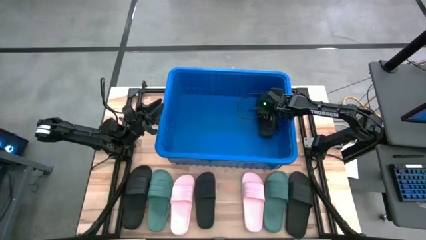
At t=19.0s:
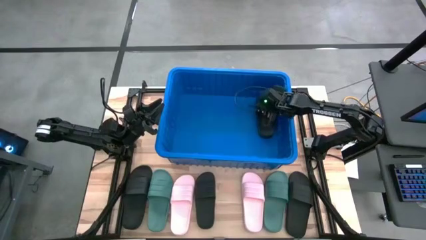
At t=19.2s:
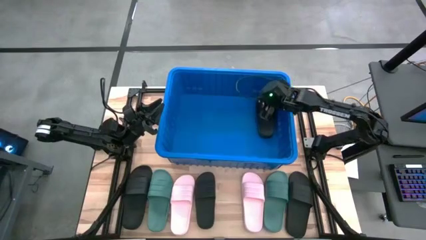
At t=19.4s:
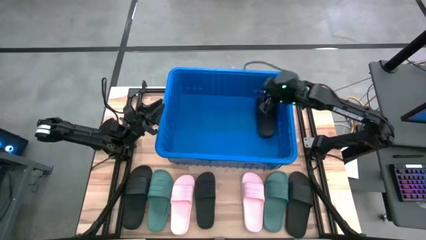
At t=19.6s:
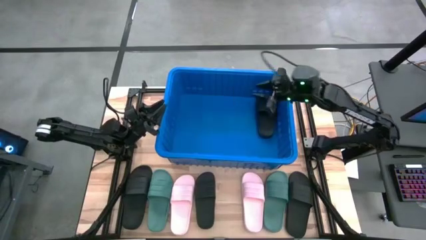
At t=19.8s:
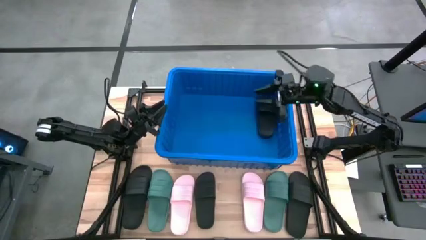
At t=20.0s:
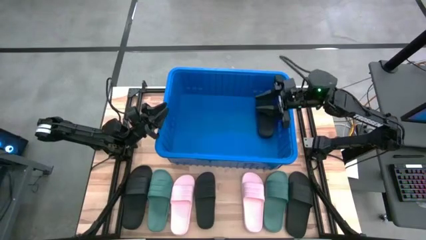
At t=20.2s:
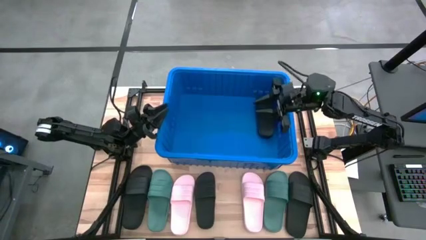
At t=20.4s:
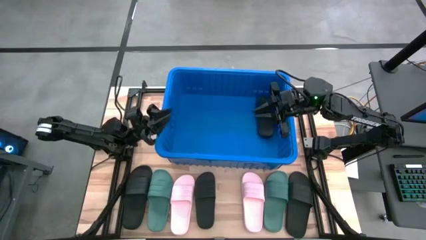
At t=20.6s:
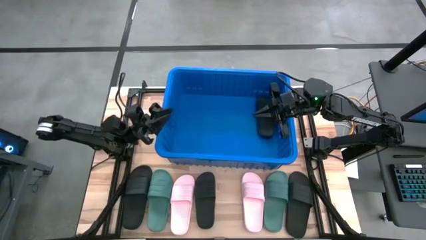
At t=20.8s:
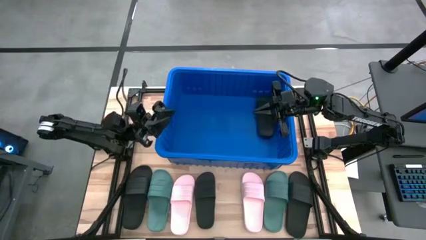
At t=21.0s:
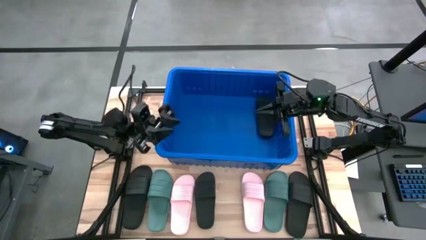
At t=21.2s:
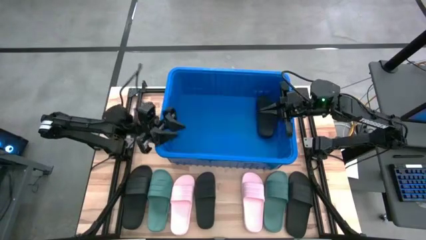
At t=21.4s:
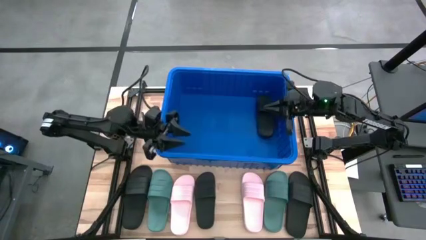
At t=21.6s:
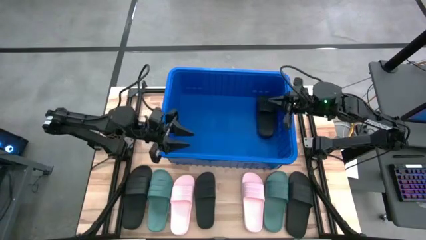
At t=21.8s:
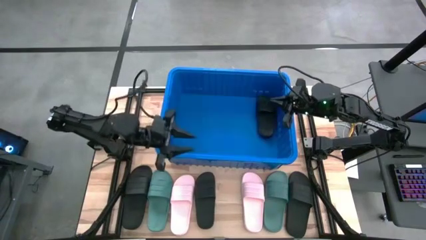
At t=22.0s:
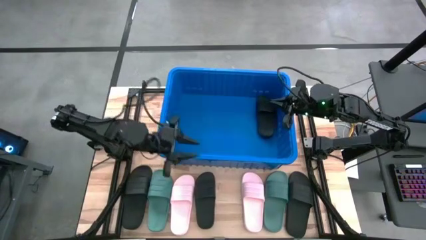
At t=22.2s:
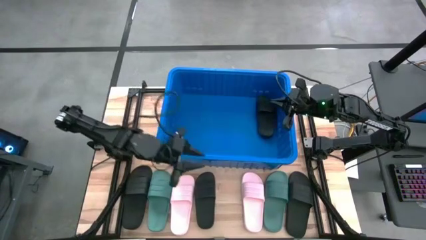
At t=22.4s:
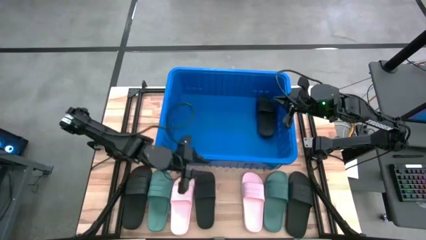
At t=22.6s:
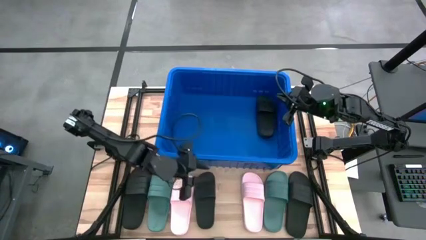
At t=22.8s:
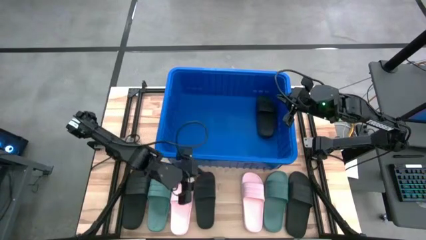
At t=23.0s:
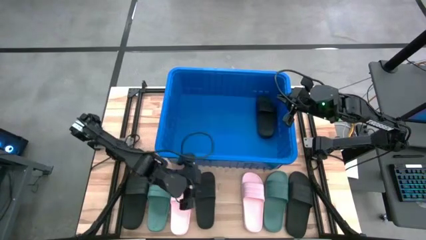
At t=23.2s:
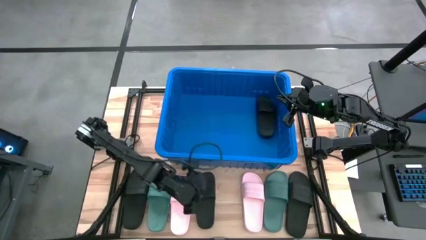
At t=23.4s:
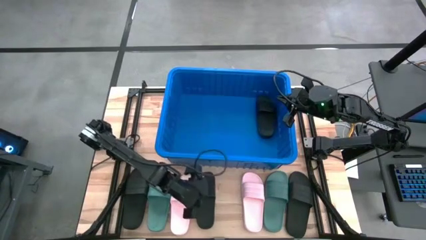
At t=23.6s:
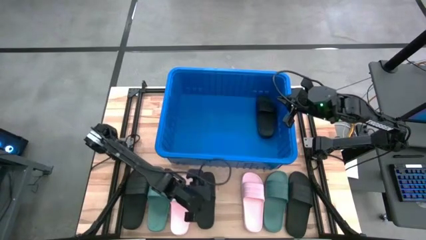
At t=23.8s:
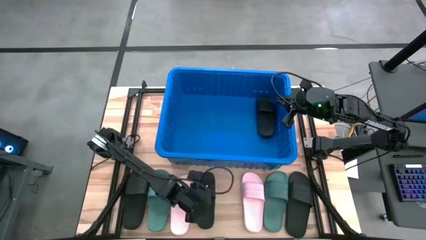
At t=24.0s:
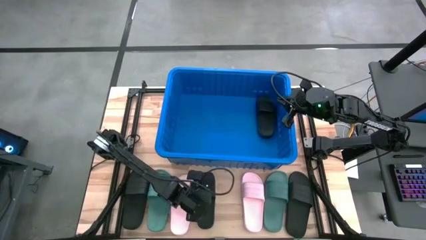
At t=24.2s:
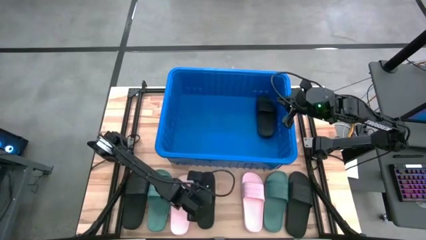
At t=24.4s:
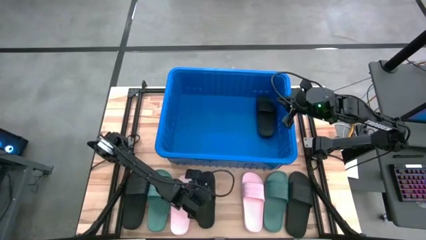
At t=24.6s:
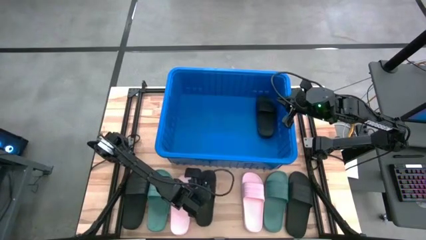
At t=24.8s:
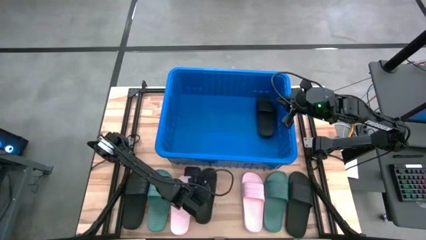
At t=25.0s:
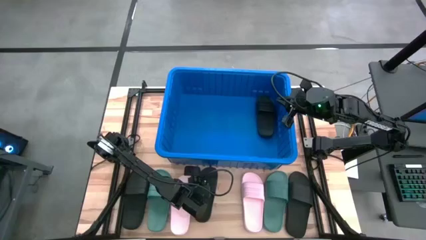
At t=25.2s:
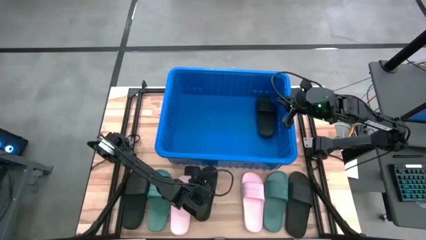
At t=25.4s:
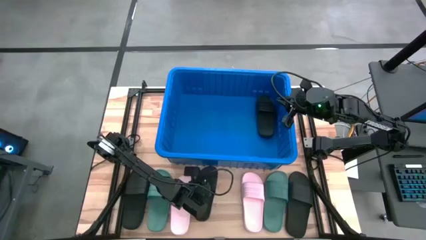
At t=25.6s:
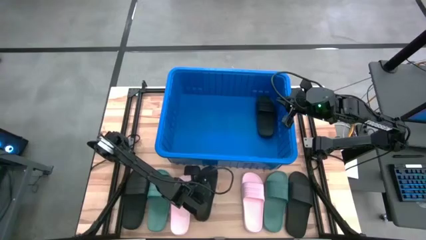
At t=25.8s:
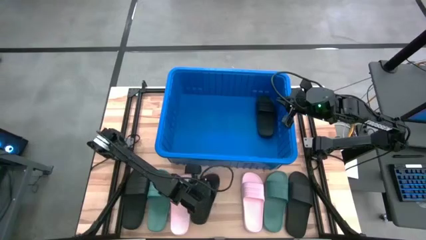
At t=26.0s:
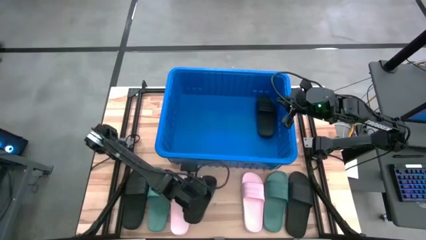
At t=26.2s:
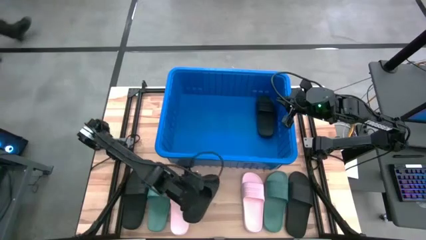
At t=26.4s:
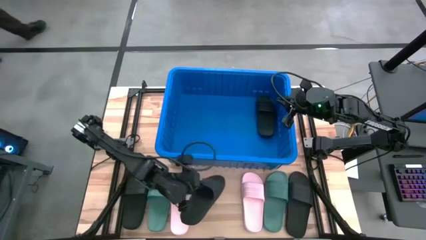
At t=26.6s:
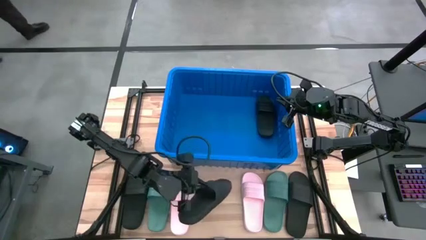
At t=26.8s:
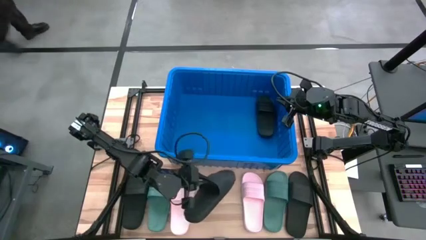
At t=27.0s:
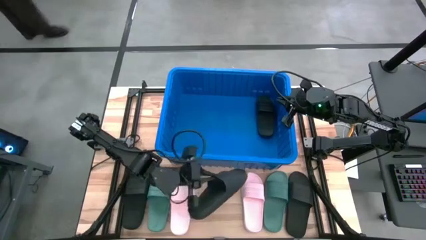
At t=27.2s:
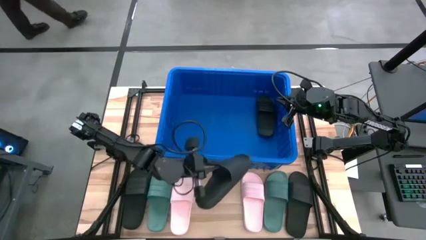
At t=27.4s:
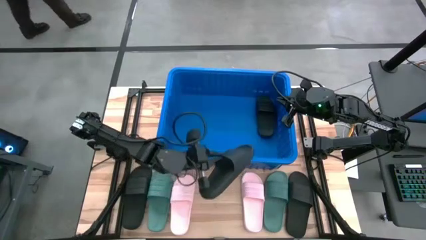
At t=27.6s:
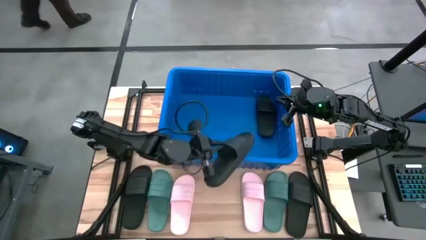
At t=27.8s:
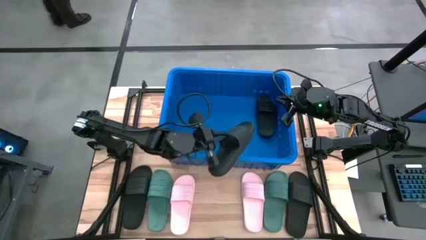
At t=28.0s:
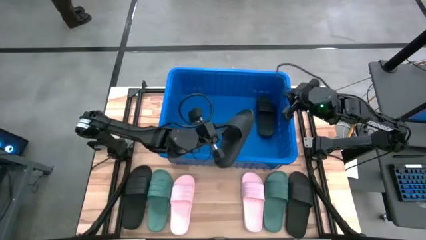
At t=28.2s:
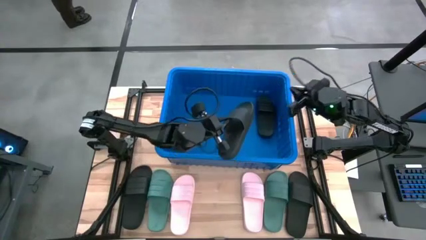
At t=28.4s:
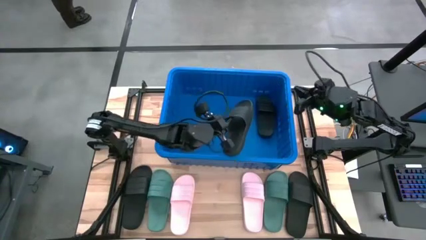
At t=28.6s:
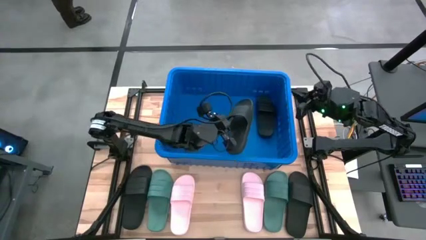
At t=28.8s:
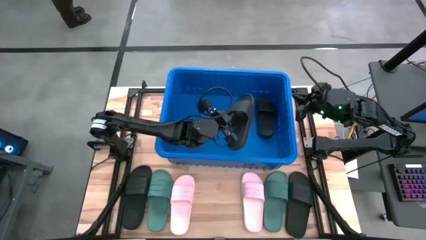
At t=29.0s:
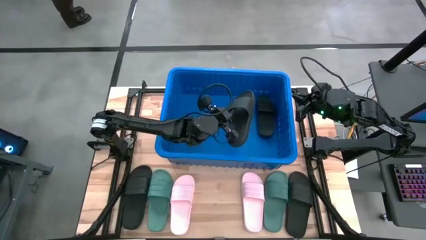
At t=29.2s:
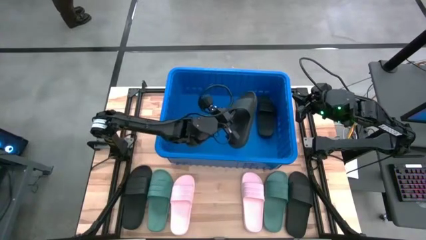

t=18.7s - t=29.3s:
Task: Pick and place slides into bin
Put the middle black slide into the blue bin
